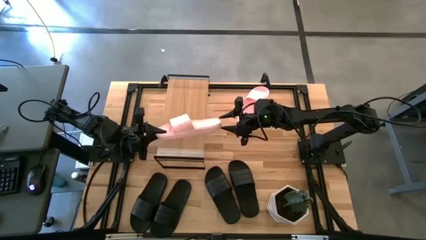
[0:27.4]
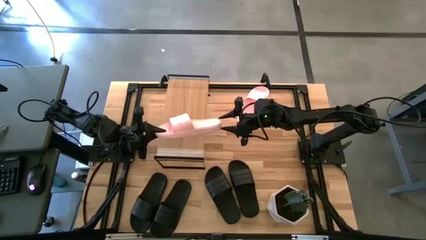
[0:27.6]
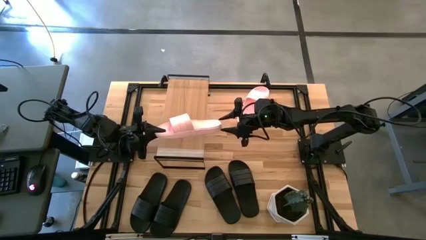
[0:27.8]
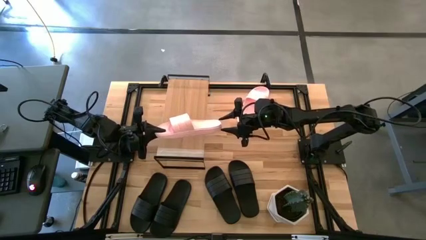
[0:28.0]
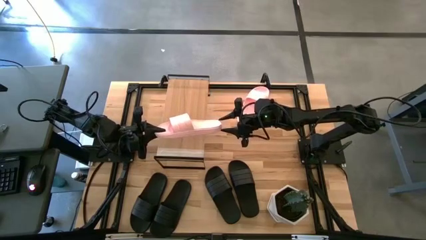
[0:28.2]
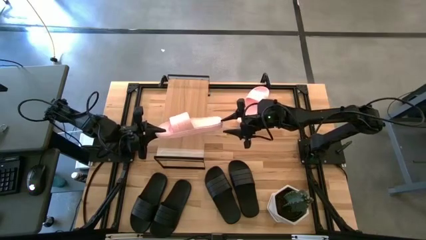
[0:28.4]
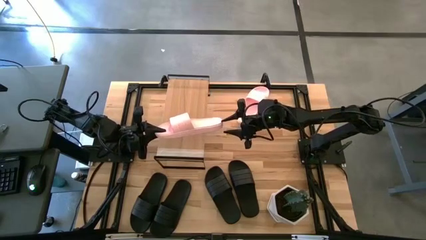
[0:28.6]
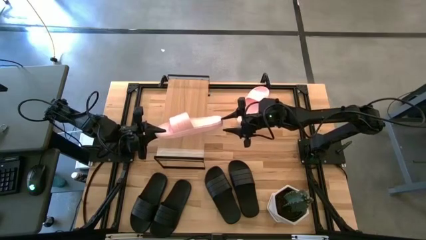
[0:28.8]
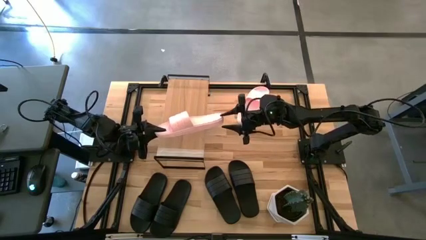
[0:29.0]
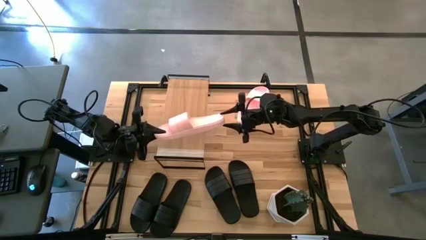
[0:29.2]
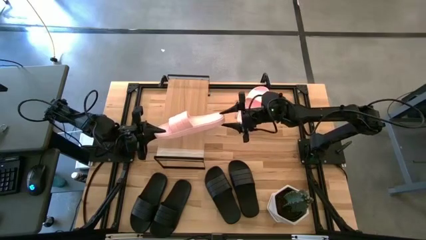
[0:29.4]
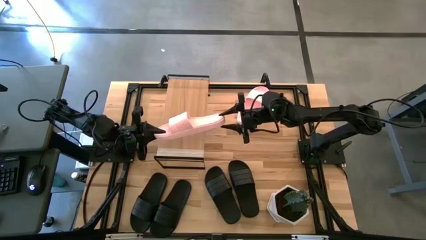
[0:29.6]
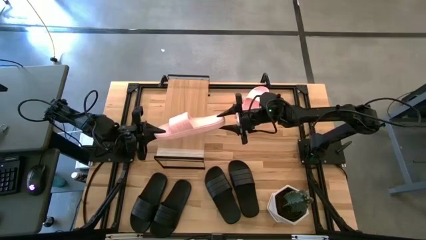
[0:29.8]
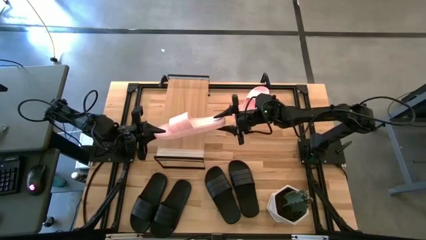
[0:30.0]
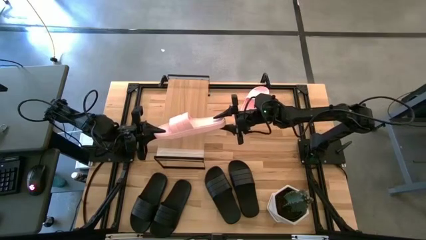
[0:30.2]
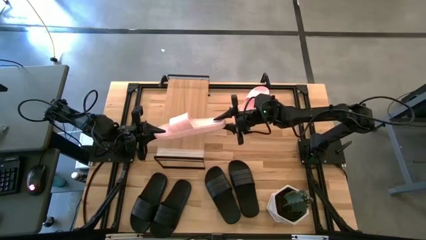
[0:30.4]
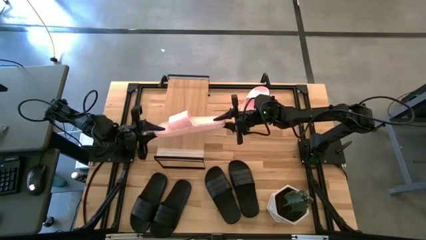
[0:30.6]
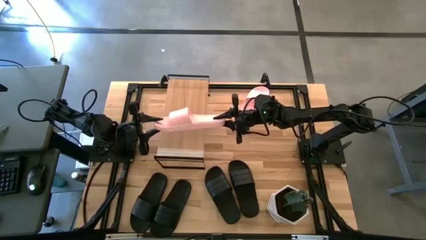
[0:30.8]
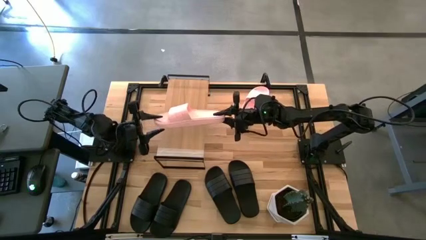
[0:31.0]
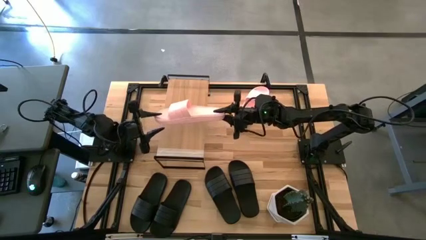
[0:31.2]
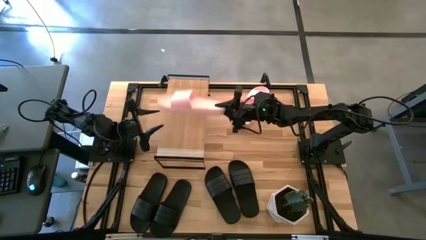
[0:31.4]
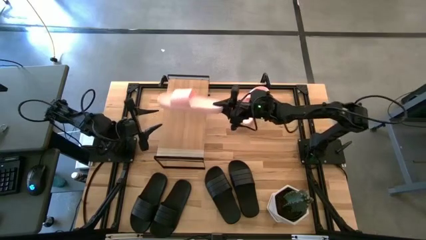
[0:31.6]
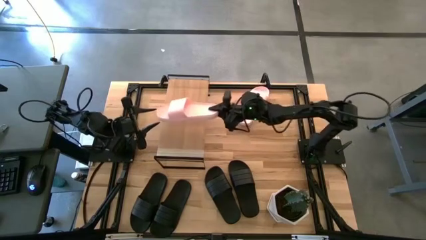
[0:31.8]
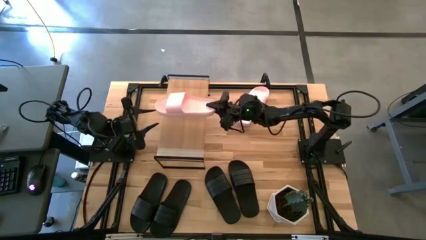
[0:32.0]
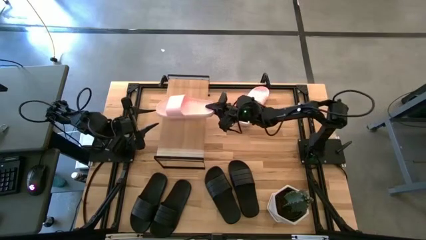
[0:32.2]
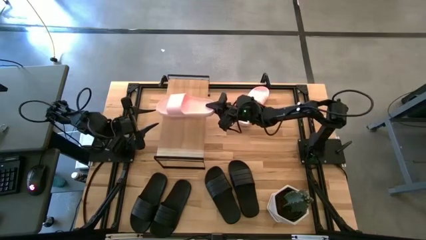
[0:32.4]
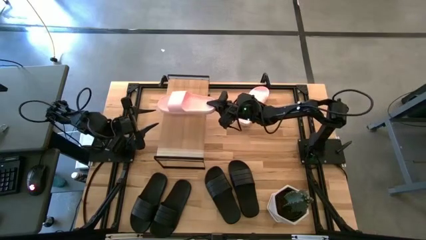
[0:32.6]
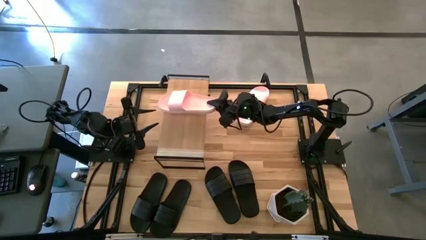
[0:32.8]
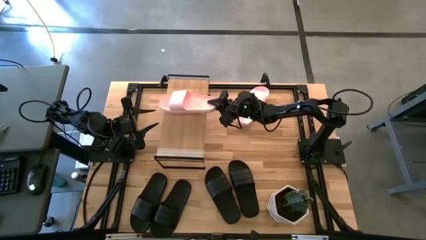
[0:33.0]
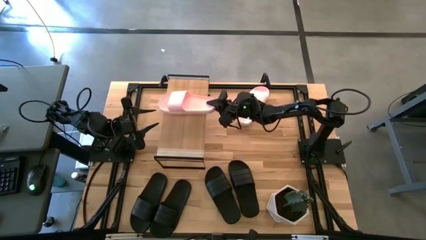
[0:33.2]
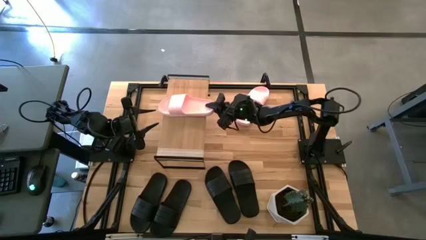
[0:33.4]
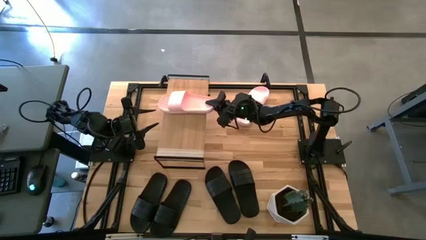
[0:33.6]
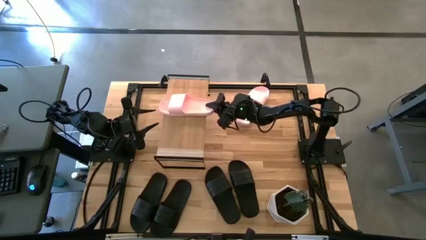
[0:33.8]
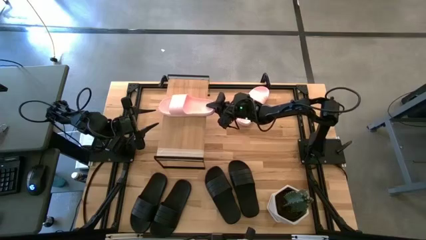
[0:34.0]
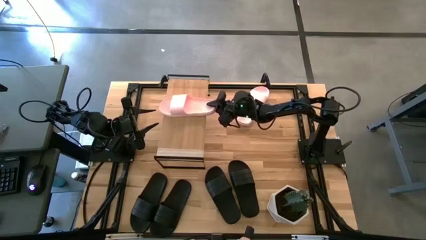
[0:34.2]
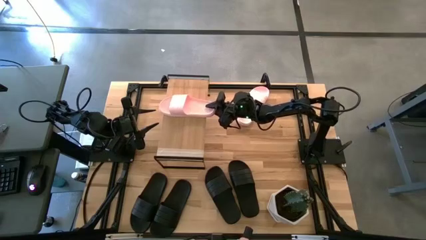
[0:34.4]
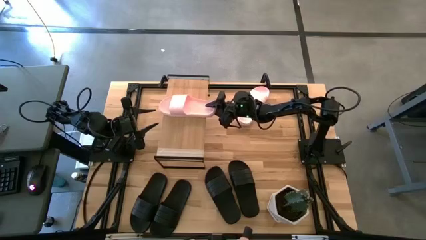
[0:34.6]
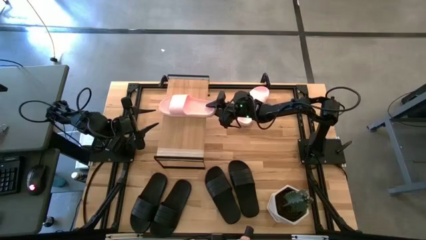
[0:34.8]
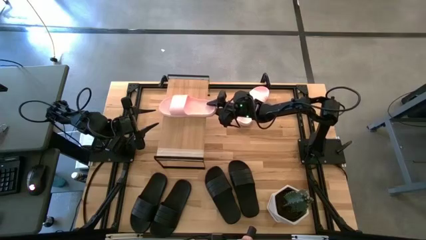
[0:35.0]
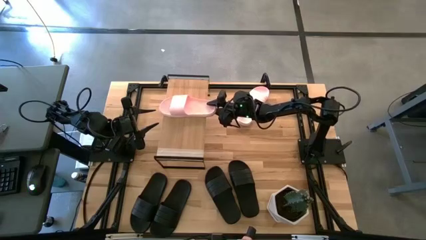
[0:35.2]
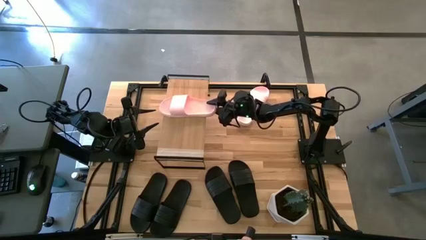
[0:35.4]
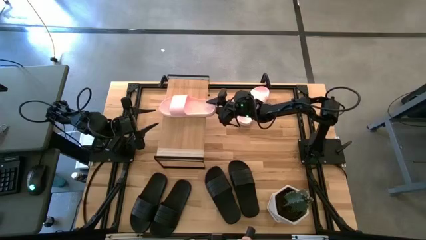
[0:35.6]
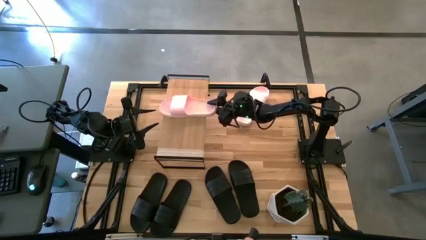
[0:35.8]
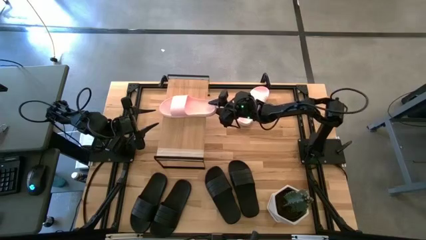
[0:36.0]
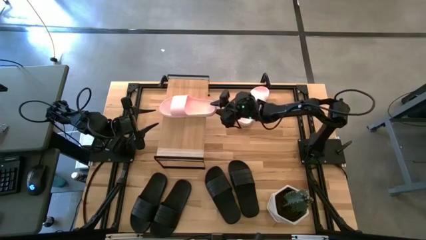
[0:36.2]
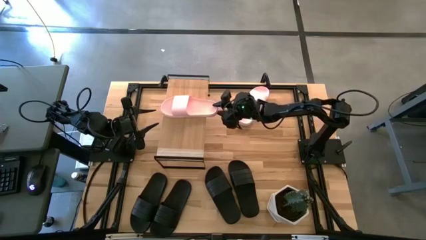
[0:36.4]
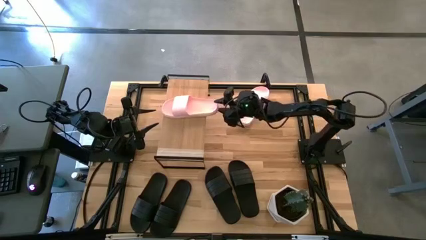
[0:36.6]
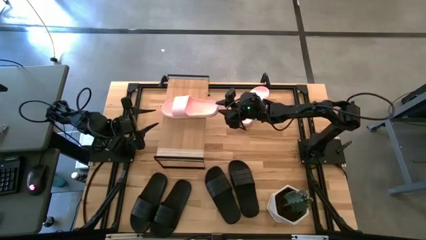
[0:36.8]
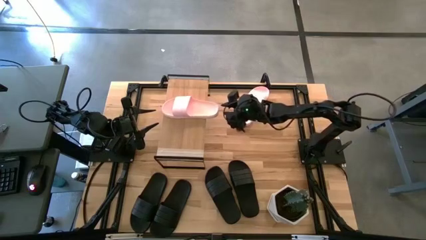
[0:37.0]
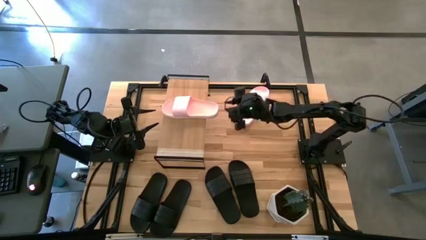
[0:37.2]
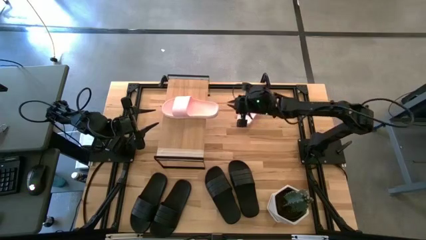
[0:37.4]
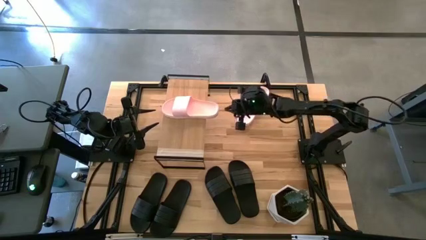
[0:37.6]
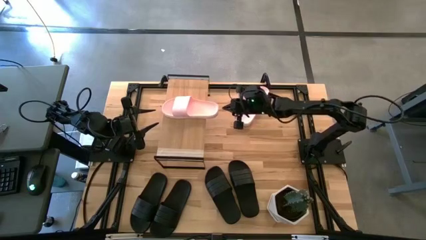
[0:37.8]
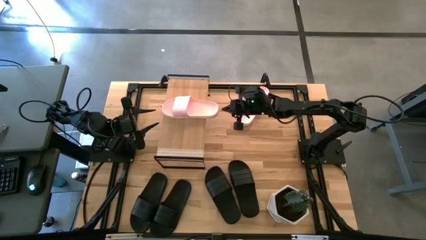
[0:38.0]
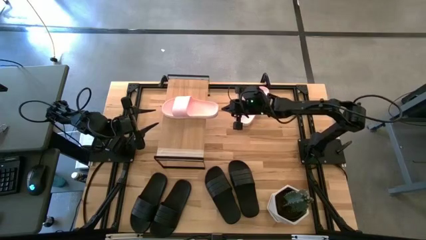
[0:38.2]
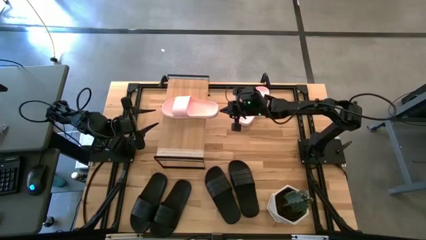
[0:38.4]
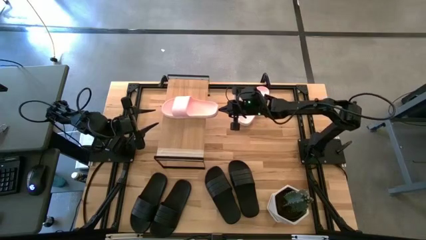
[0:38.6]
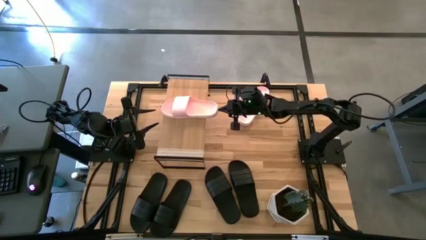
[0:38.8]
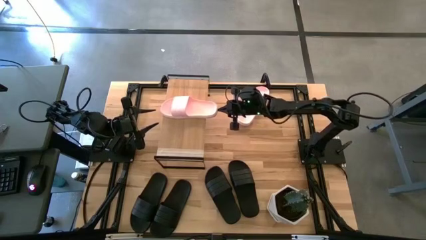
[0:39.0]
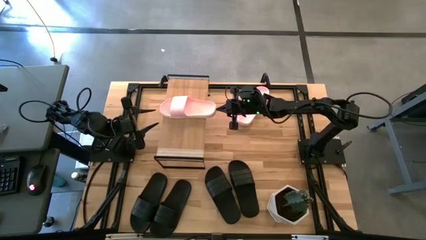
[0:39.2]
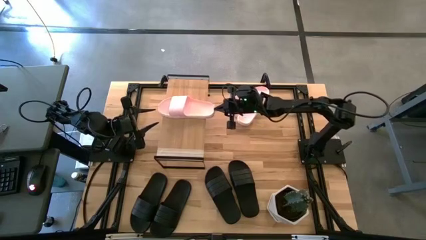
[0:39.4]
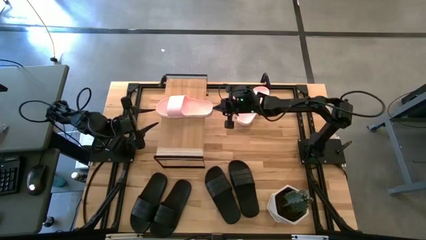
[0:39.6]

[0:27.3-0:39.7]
Task: Pick and place slides into the shelf
Put the pink slide on the shelf
